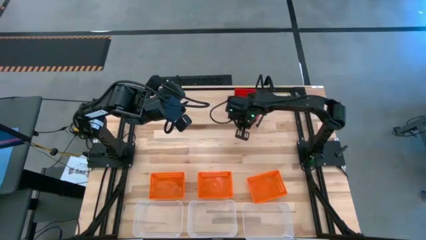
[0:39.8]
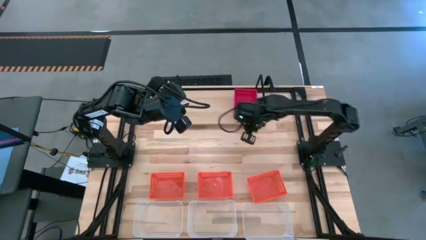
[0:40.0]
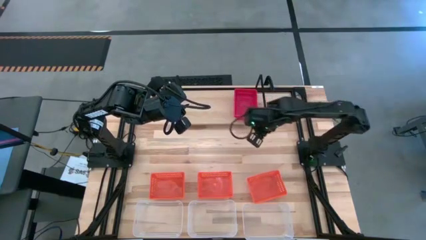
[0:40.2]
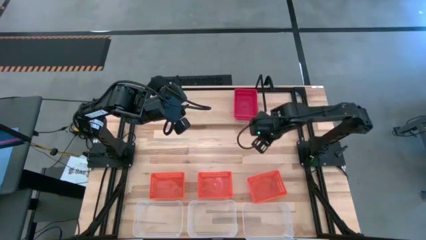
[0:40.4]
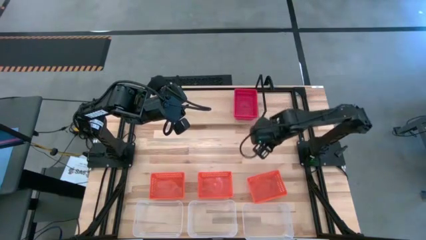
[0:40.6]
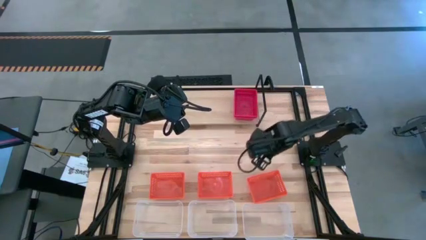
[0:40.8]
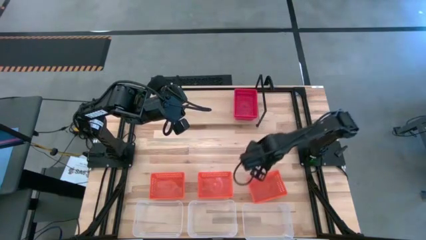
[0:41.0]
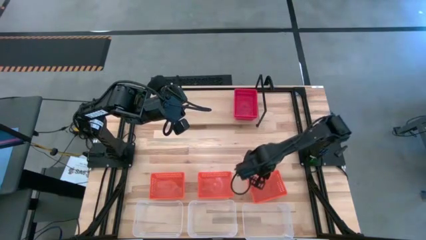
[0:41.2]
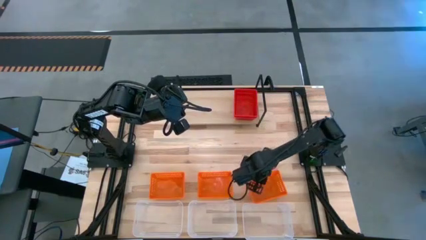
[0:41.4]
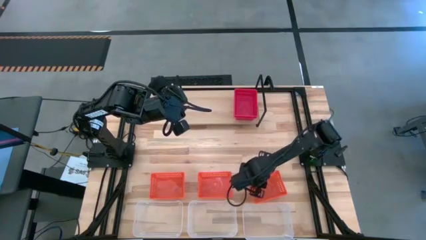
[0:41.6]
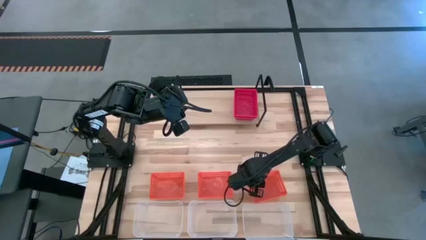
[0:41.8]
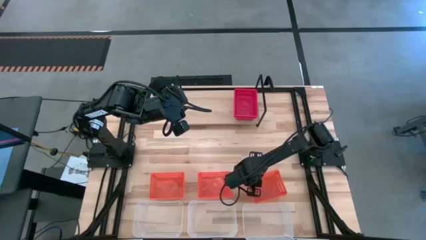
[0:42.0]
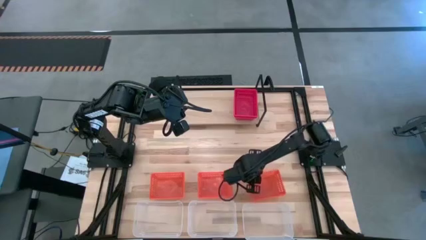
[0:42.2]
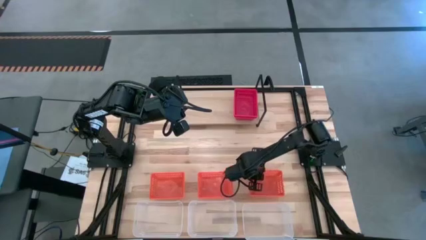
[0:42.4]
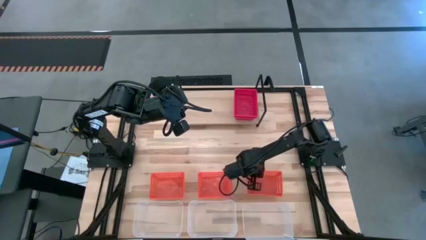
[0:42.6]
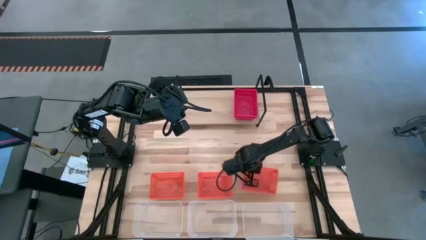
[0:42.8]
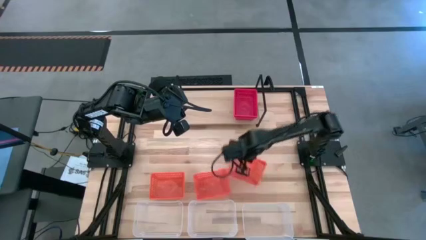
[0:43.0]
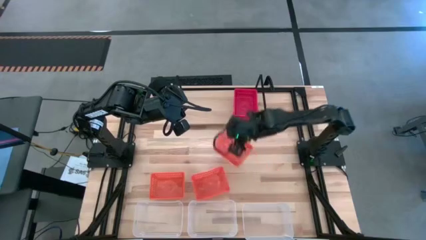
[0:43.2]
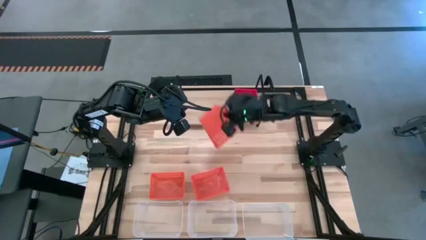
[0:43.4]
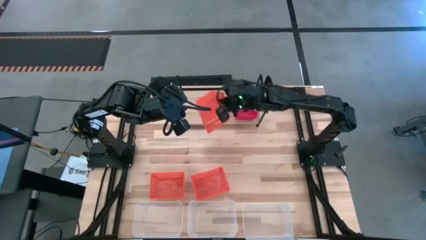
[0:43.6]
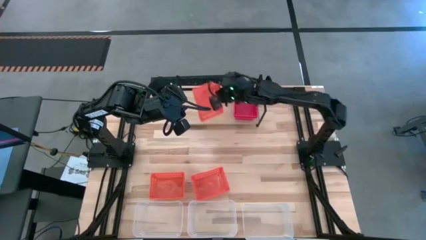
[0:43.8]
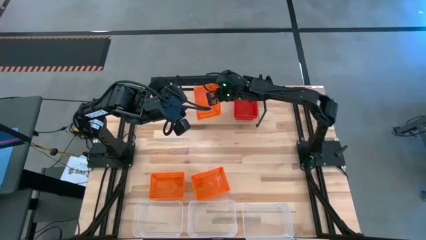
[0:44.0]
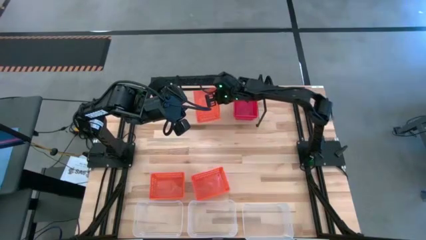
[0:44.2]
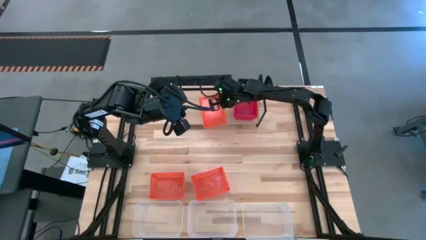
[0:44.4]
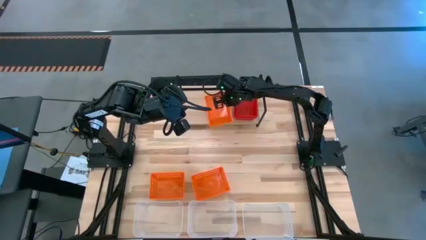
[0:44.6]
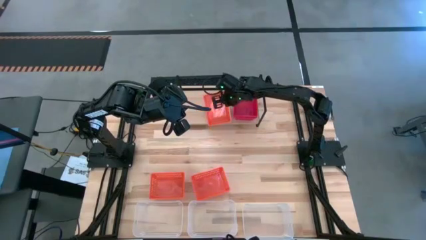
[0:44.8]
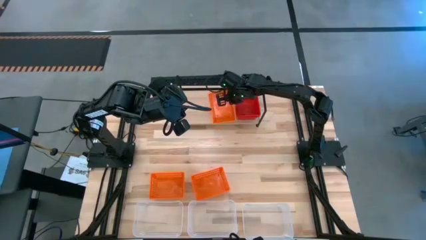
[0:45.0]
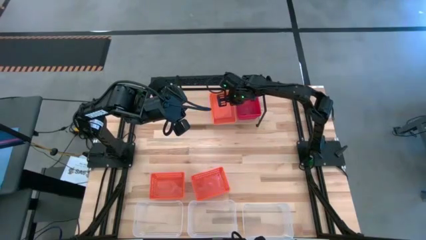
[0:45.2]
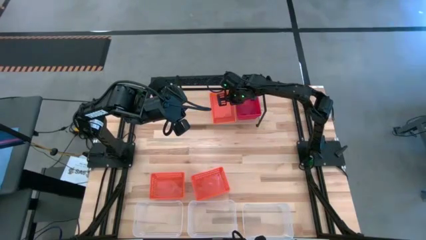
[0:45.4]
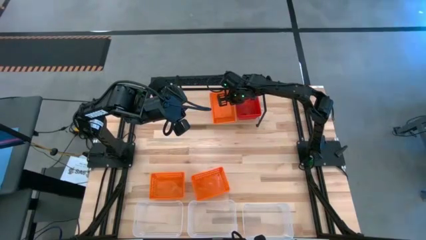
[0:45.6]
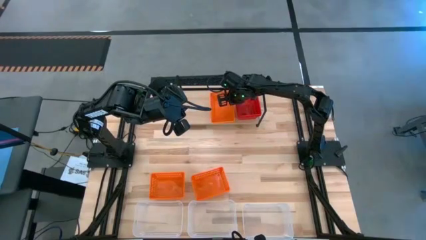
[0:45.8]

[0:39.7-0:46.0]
Task: Stack baskets on shelf by color
Put the right orange bin on the shelf

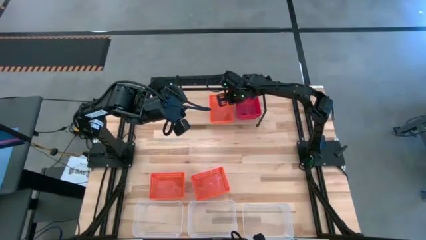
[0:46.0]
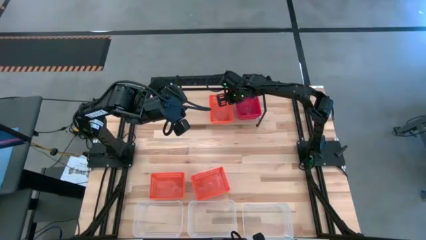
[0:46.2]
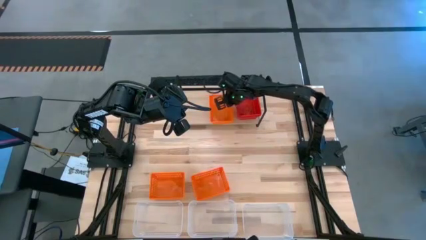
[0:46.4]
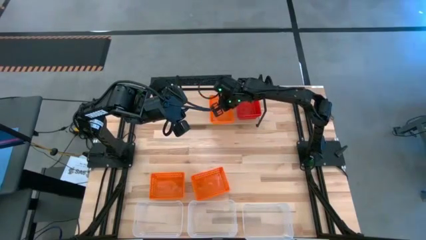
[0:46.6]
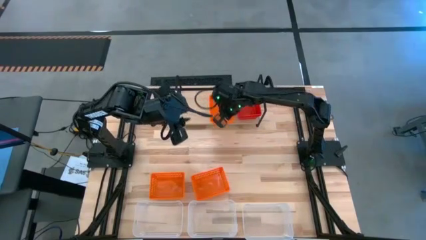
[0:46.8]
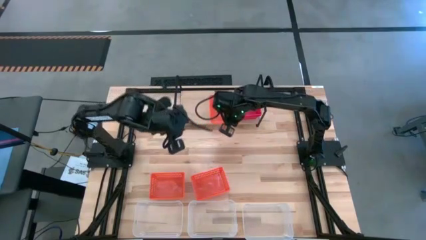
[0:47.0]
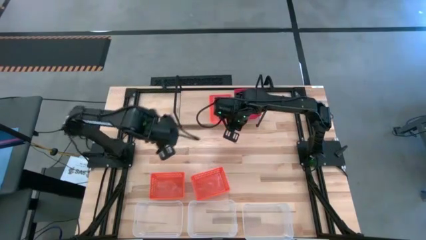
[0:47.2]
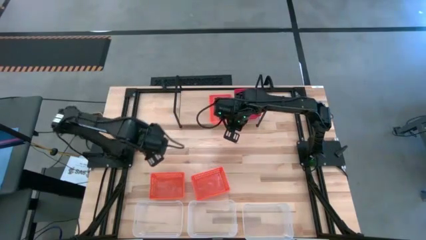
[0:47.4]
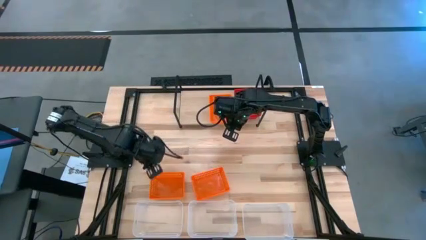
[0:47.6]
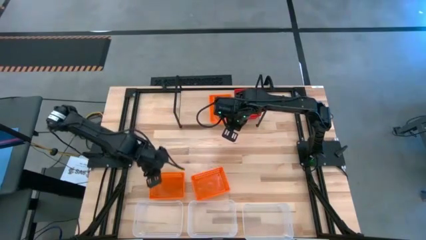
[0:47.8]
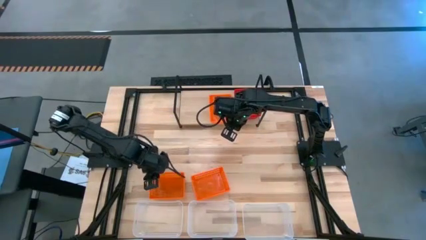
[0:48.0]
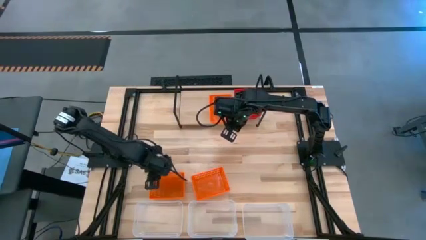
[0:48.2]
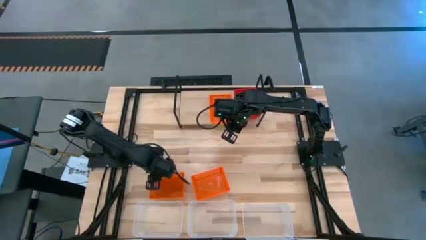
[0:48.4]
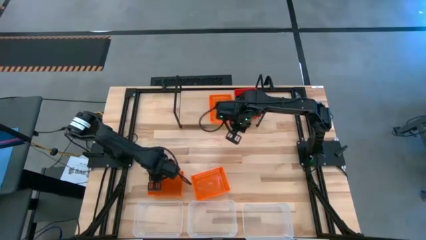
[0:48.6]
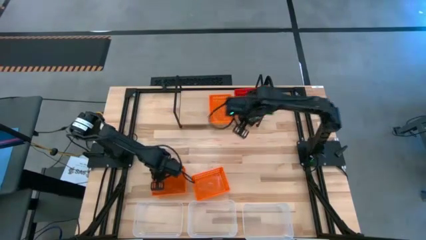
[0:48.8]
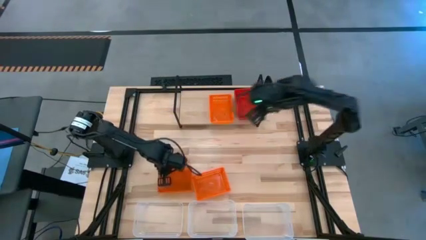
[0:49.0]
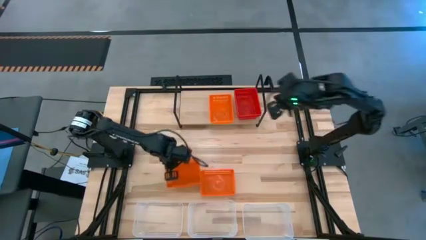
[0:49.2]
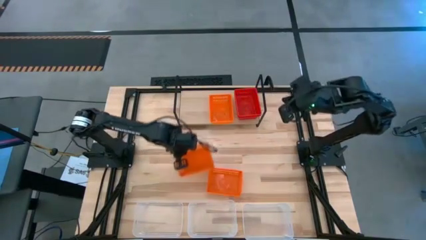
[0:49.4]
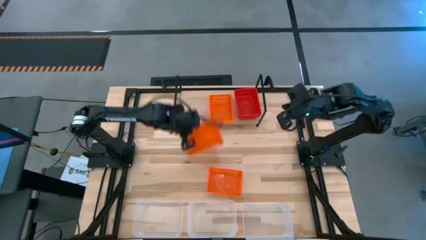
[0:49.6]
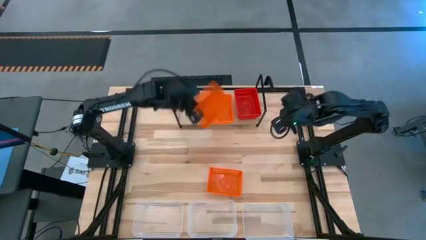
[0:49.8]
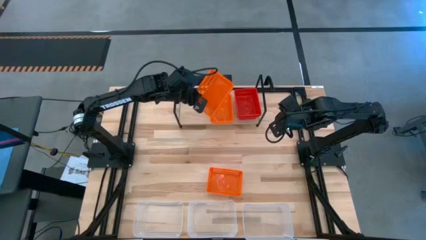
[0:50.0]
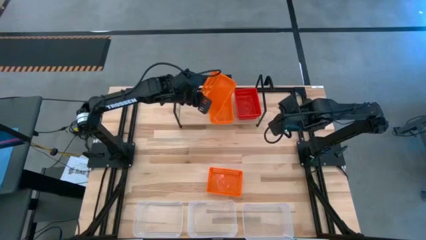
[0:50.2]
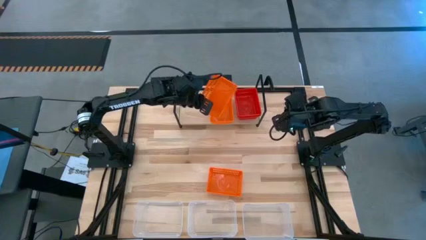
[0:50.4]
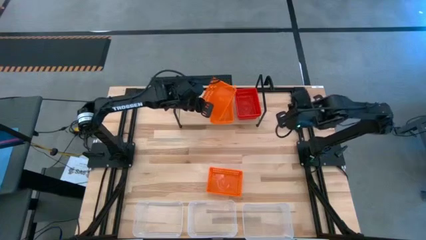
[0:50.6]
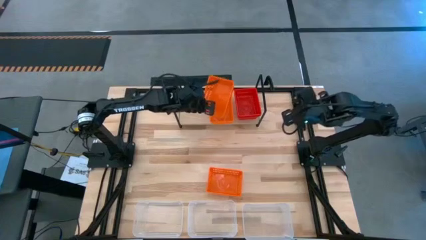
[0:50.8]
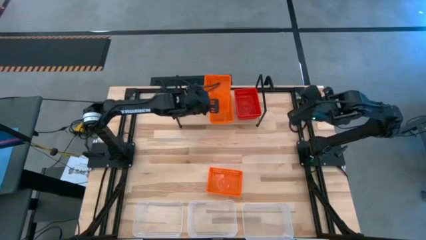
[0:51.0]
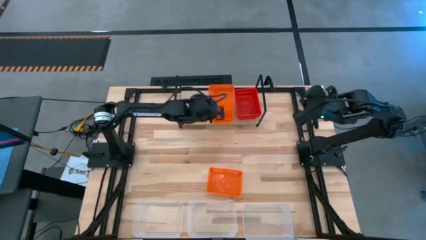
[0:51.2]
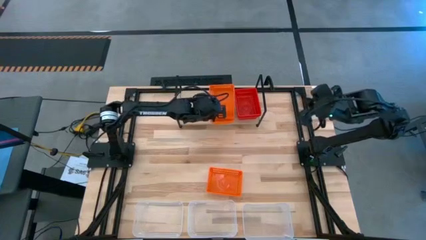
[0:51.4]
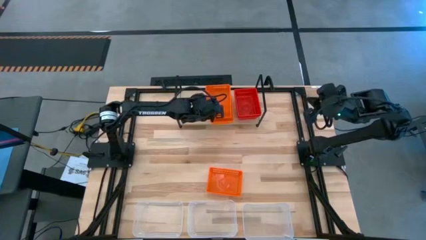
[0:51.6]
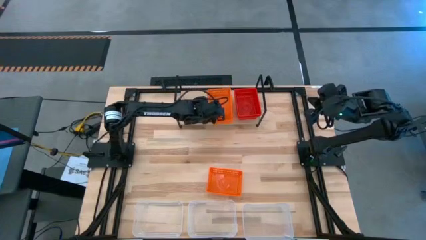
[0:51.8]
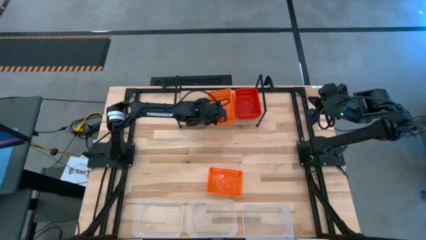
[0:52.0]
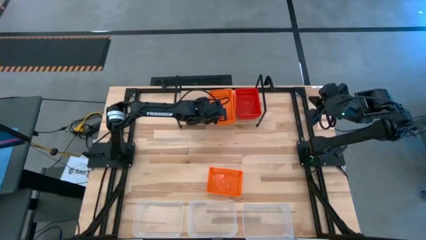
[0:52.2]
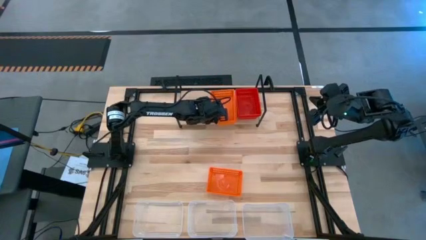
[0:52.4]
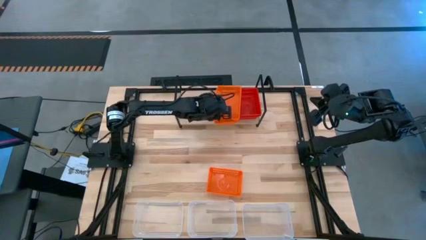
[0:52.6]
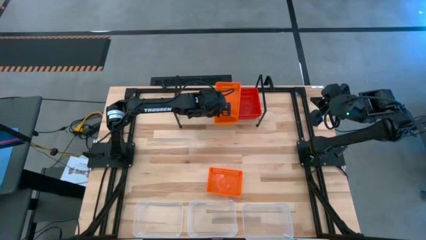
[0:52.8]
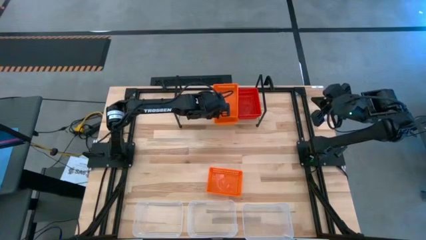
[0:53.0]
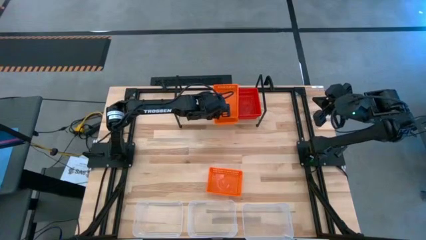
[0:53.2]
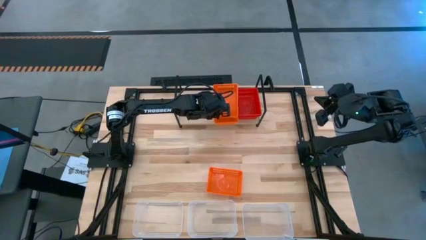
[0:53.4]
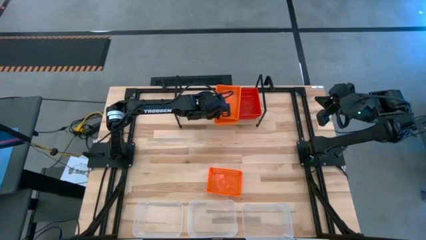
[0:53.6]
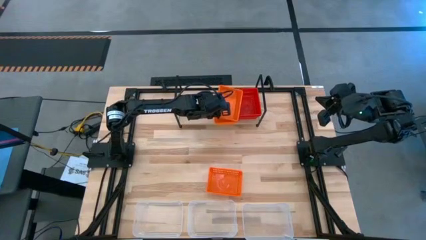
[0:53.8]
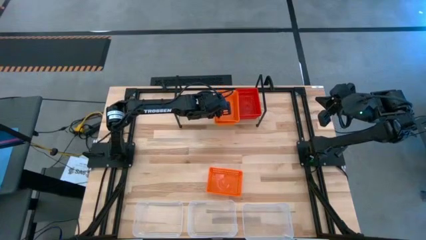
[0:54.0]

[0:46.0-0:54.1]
Stack the left orange bin on top of the orange bin on the shelf

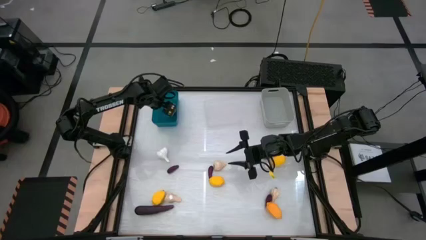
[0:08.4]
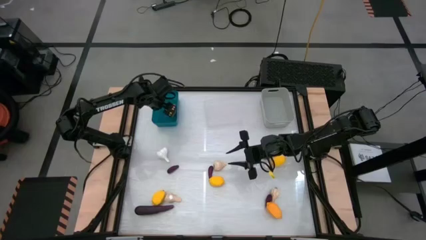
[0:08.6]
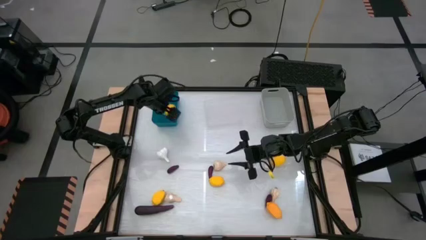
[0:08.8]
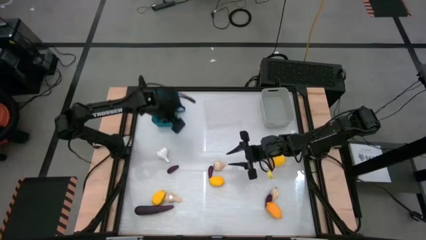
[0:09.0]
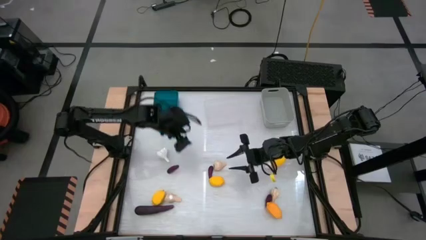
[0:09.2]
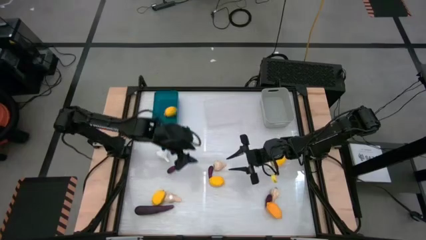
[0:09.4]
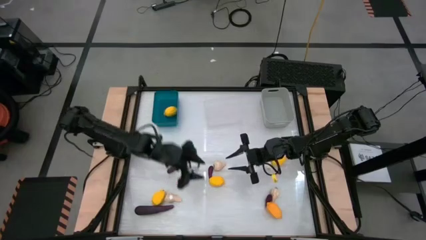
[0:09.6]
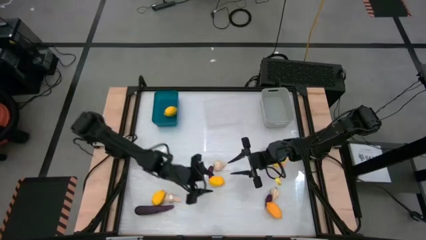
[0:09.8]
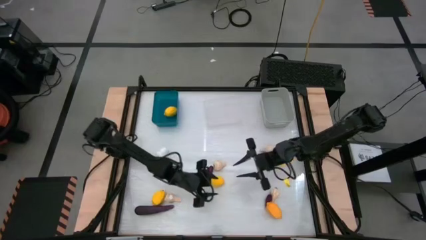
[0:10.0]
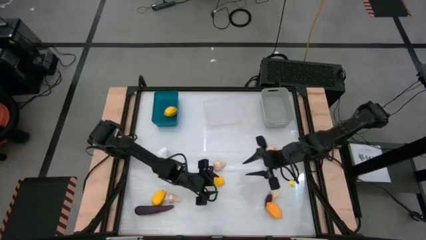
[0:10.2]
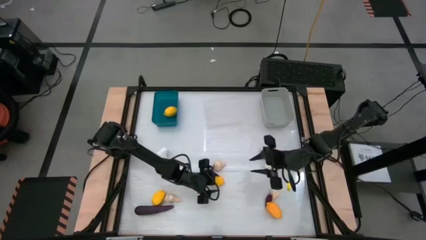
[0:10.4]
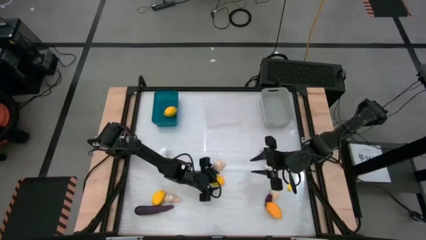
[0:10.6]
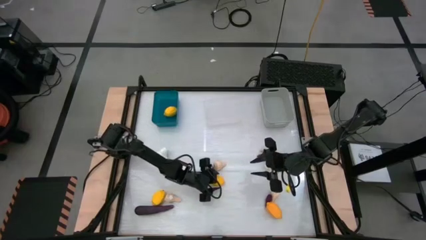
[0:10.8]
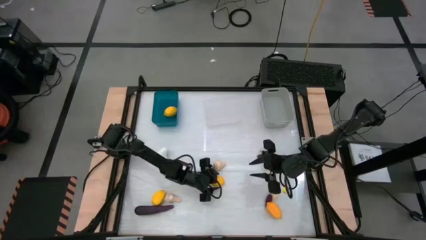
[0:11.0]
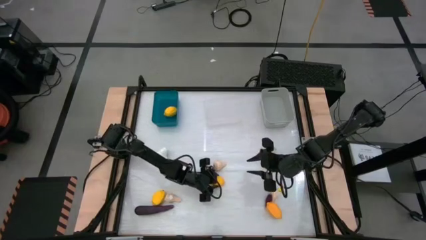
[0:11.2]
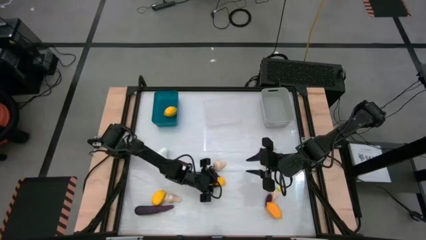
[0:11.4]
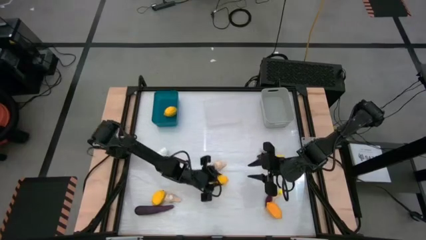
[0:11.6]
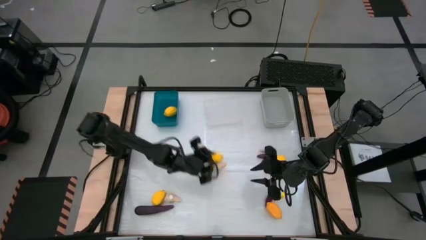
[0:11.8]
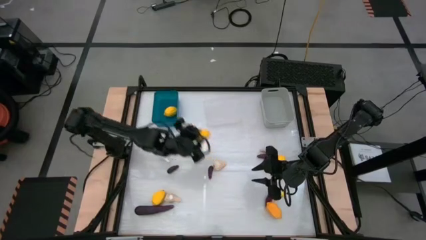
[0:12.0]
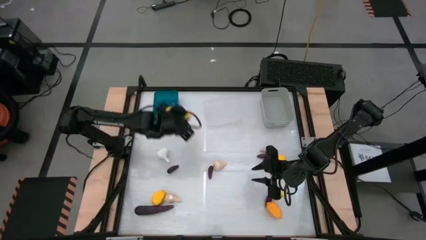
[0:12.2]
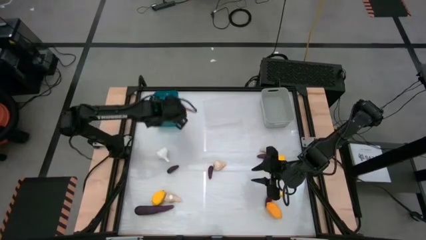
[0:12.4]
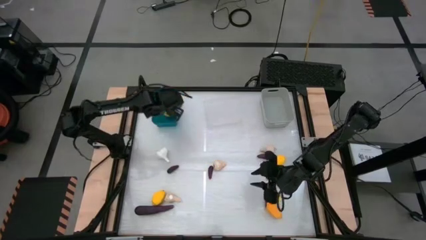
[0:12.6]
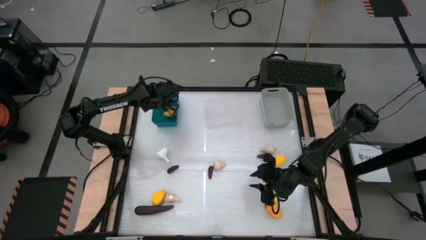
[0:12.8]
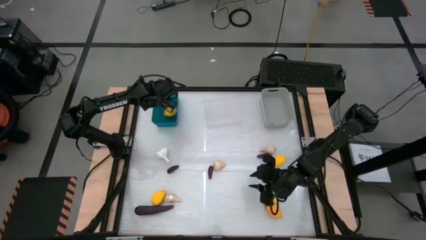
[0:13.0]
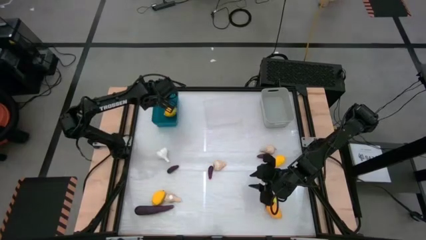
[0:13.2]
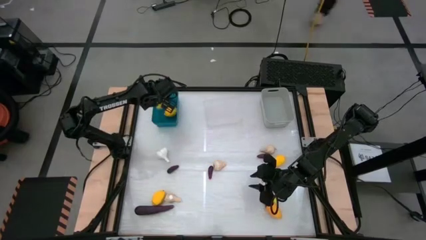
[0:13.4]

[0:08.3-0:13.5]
Task: Sort produce into baskets
Put the lemon into the blue bin
